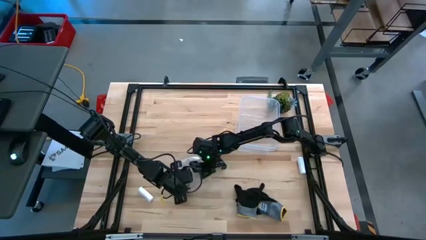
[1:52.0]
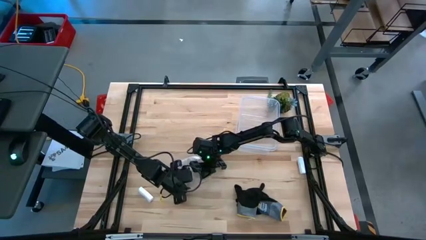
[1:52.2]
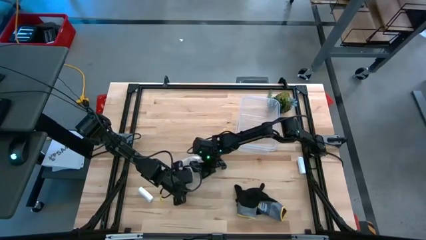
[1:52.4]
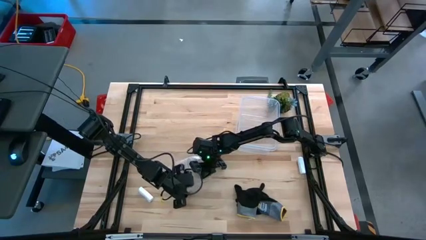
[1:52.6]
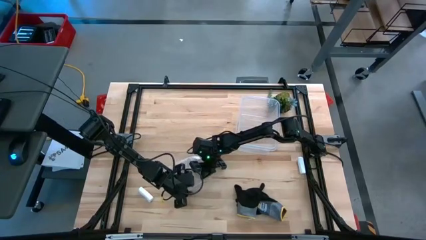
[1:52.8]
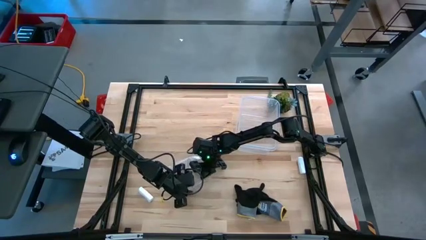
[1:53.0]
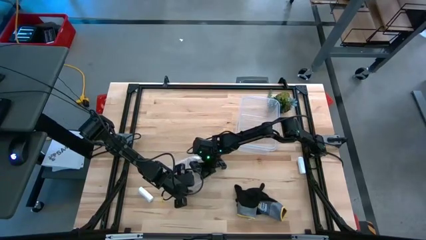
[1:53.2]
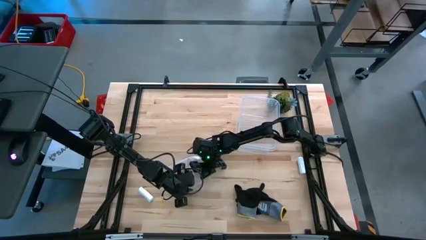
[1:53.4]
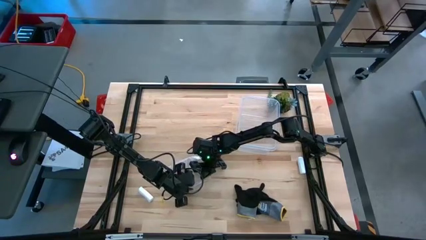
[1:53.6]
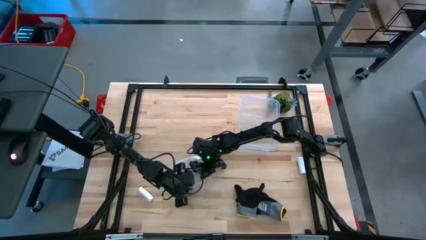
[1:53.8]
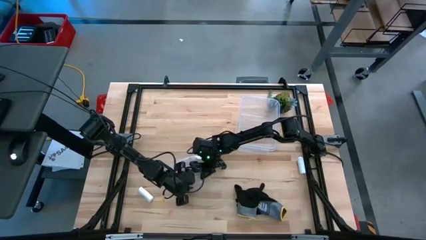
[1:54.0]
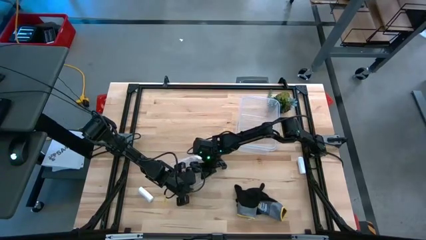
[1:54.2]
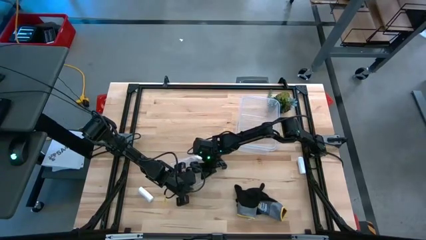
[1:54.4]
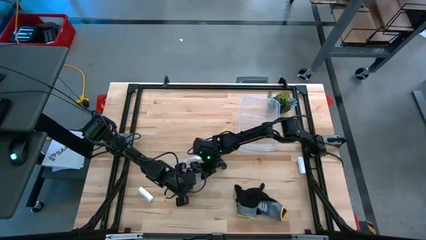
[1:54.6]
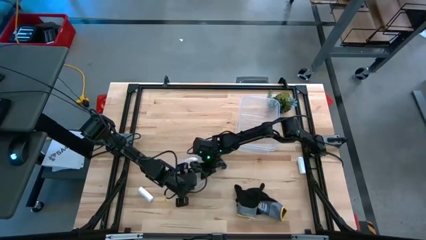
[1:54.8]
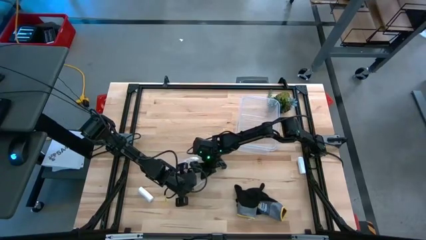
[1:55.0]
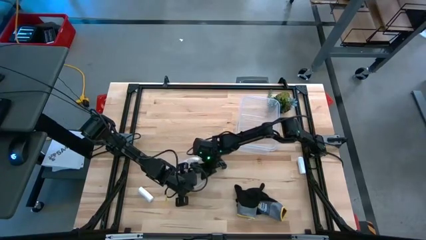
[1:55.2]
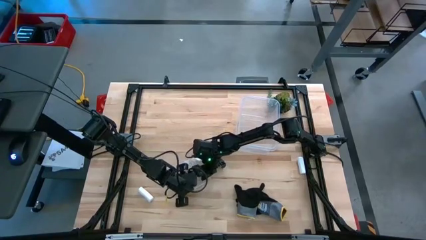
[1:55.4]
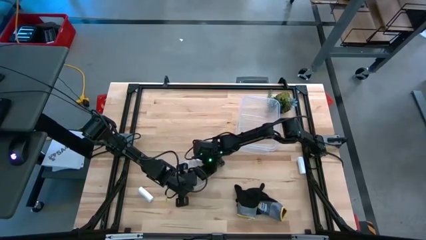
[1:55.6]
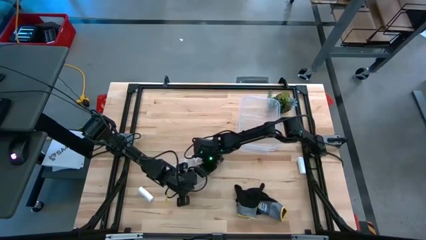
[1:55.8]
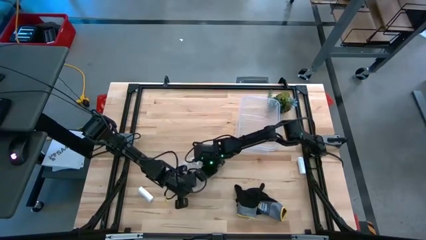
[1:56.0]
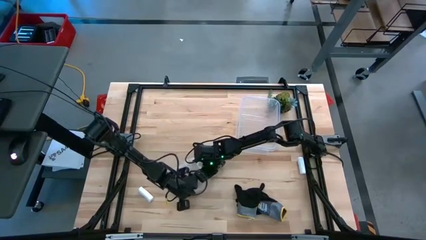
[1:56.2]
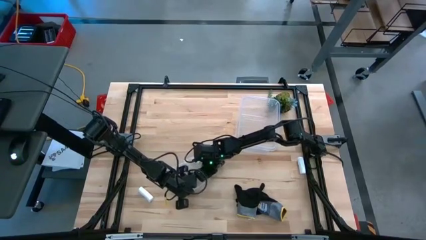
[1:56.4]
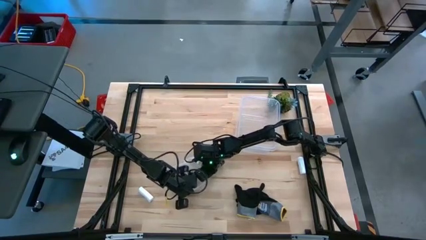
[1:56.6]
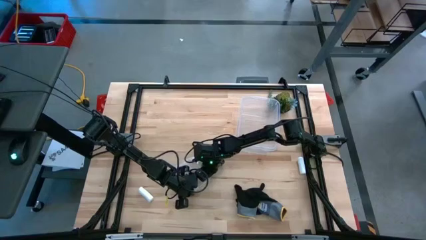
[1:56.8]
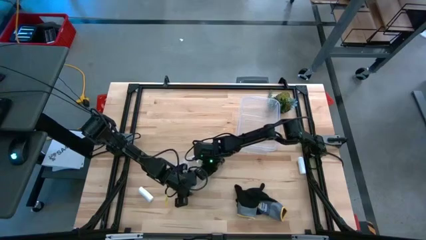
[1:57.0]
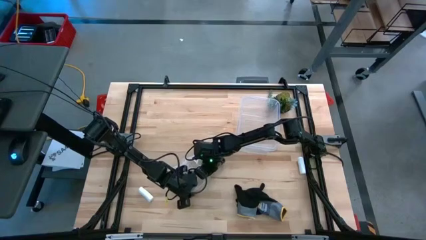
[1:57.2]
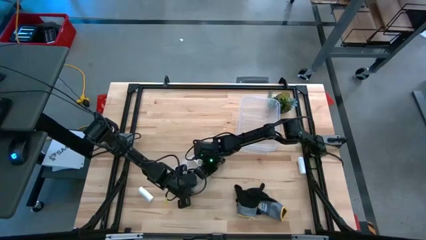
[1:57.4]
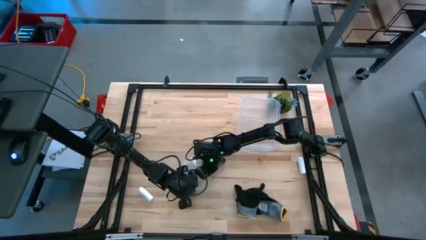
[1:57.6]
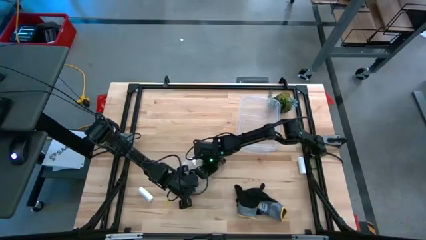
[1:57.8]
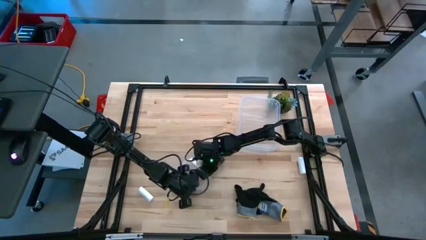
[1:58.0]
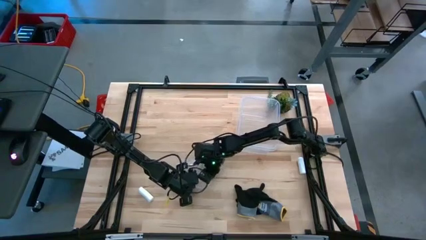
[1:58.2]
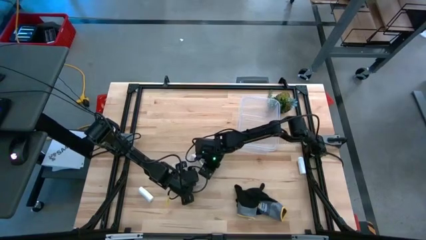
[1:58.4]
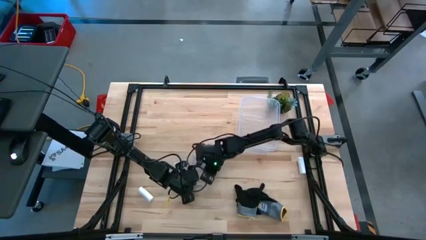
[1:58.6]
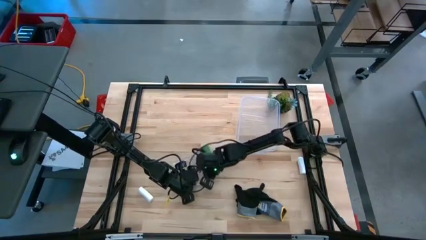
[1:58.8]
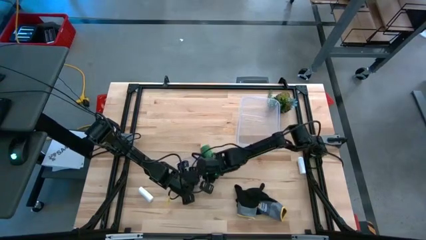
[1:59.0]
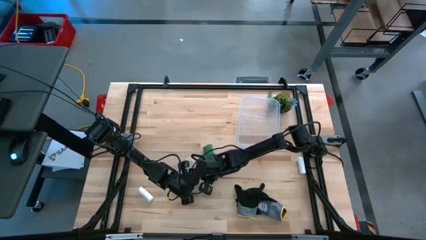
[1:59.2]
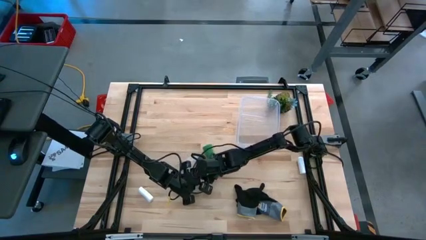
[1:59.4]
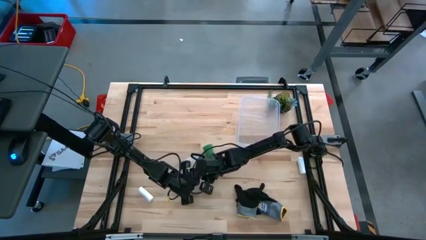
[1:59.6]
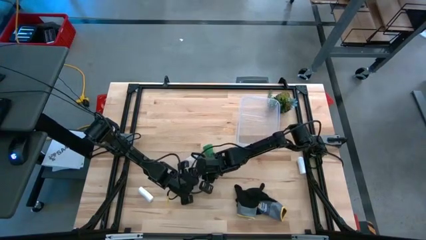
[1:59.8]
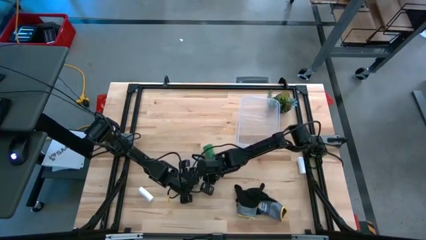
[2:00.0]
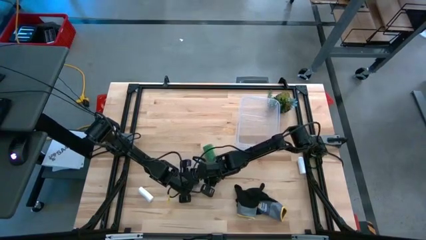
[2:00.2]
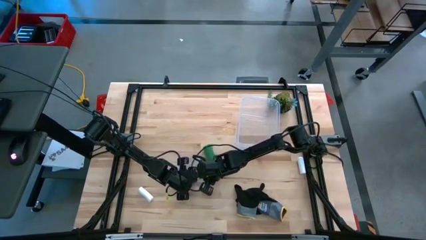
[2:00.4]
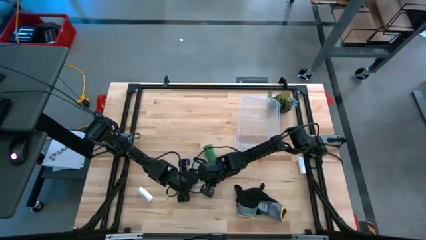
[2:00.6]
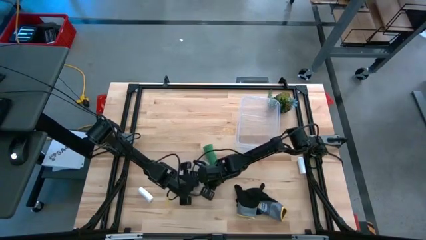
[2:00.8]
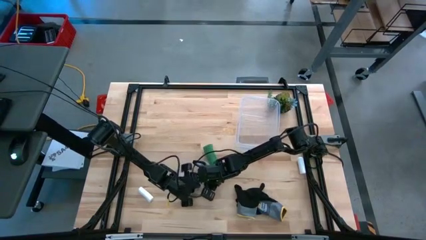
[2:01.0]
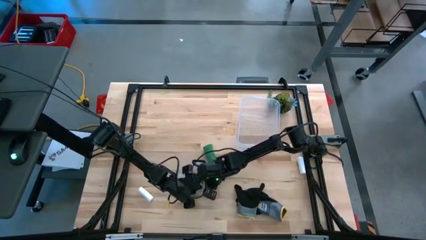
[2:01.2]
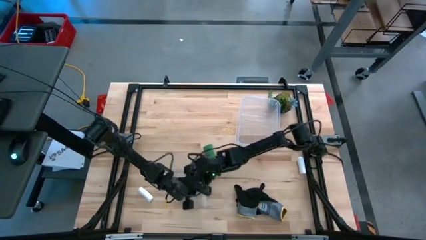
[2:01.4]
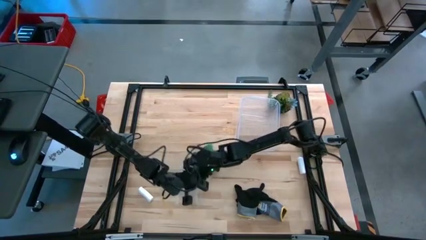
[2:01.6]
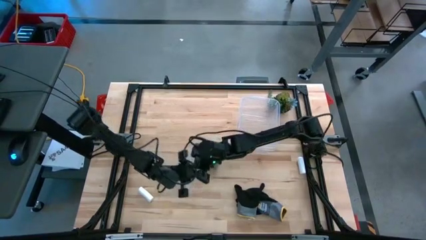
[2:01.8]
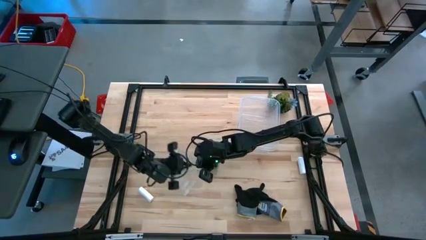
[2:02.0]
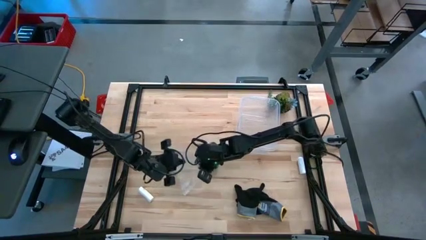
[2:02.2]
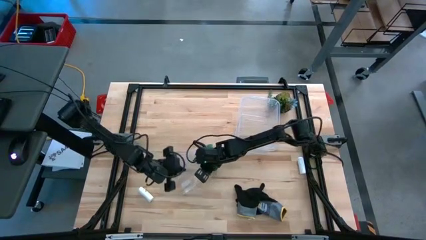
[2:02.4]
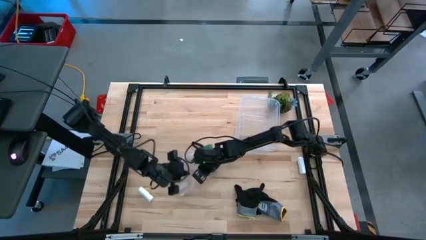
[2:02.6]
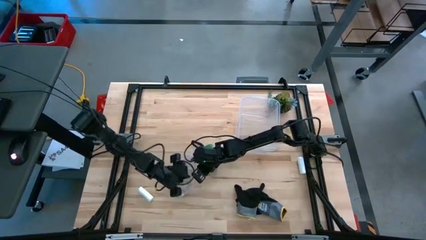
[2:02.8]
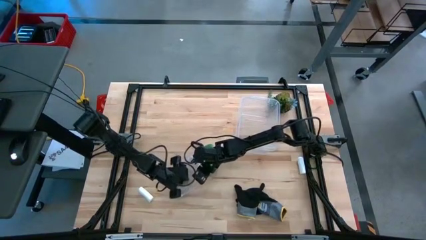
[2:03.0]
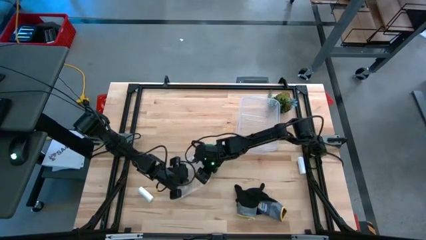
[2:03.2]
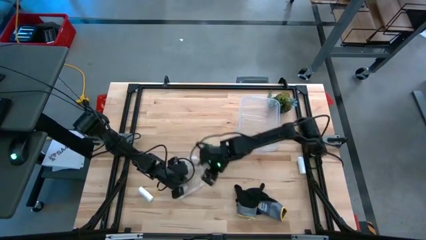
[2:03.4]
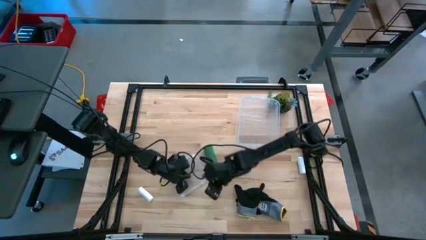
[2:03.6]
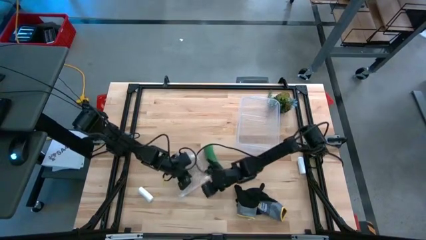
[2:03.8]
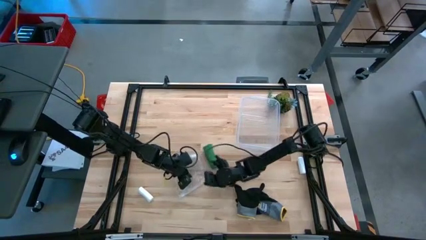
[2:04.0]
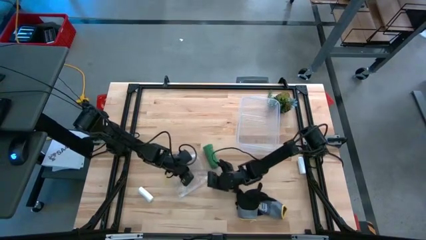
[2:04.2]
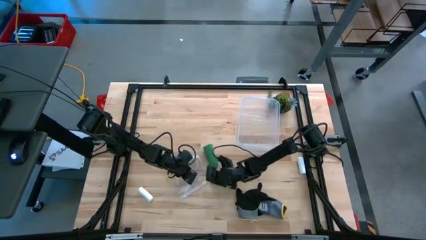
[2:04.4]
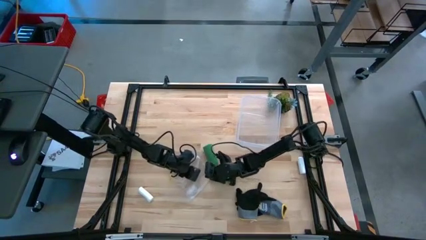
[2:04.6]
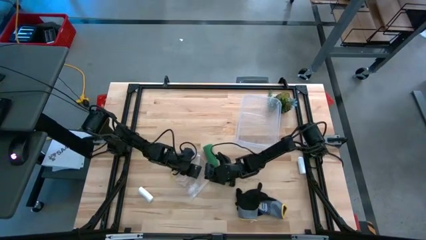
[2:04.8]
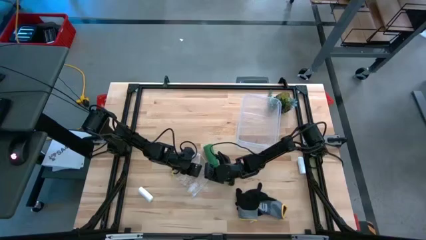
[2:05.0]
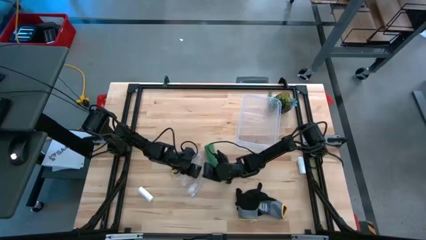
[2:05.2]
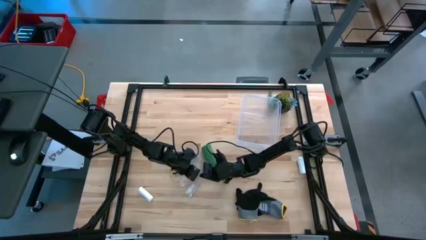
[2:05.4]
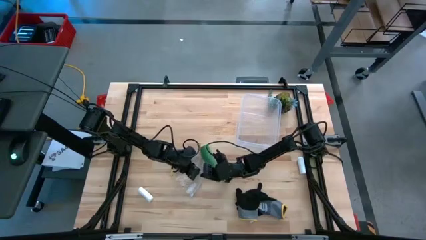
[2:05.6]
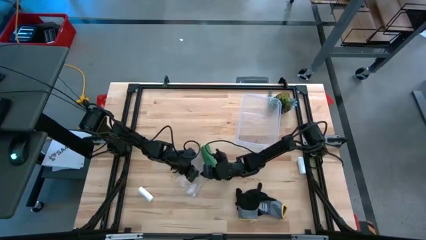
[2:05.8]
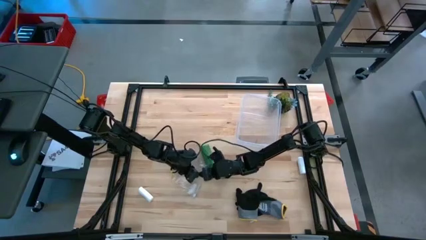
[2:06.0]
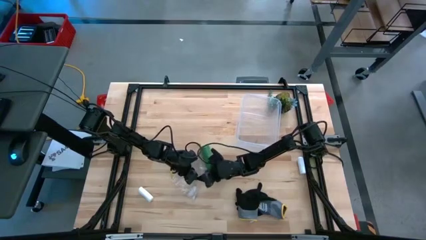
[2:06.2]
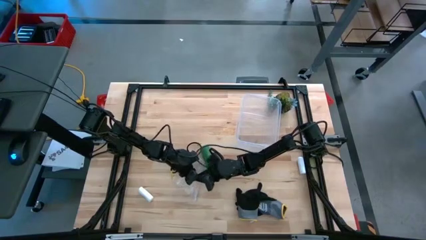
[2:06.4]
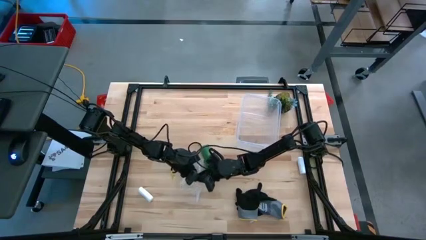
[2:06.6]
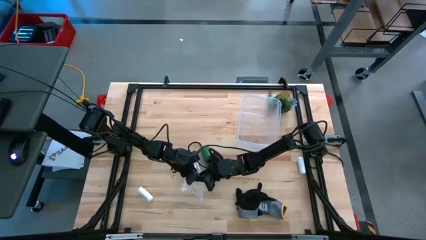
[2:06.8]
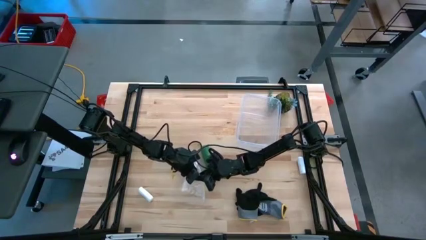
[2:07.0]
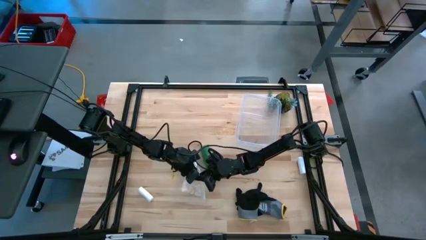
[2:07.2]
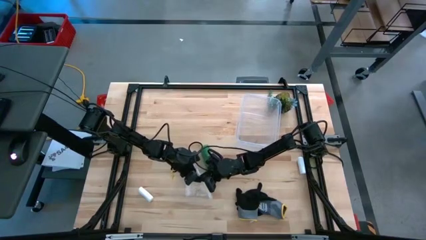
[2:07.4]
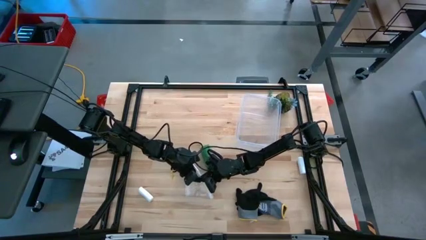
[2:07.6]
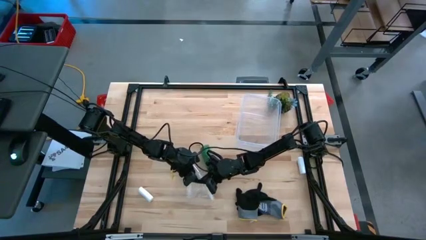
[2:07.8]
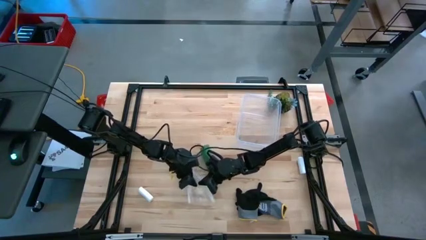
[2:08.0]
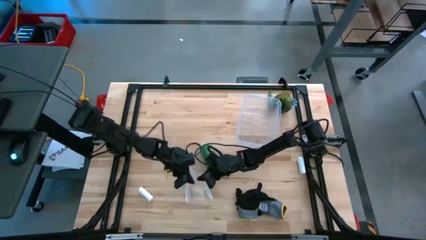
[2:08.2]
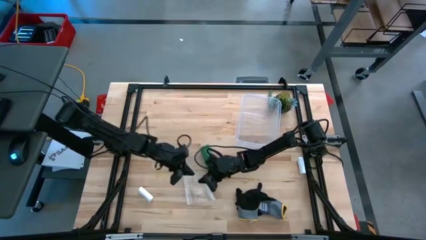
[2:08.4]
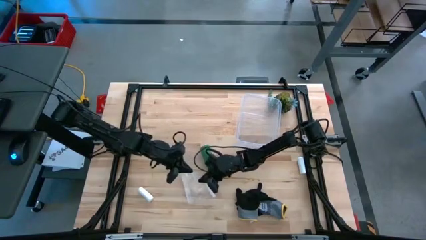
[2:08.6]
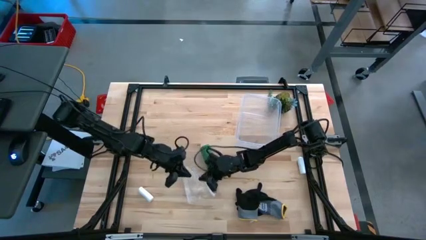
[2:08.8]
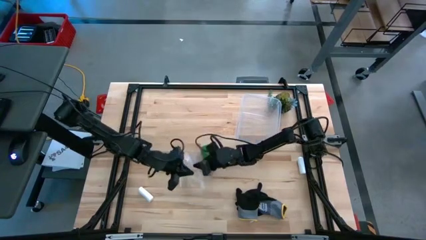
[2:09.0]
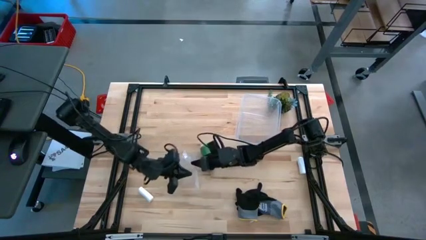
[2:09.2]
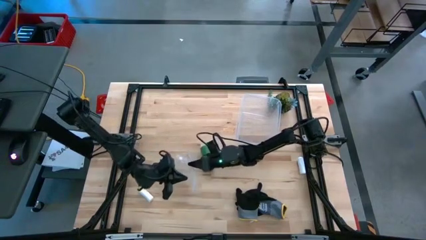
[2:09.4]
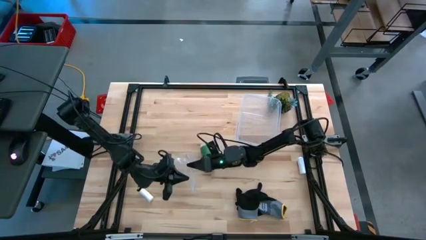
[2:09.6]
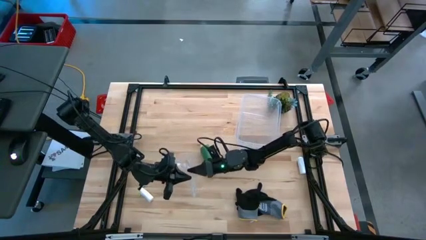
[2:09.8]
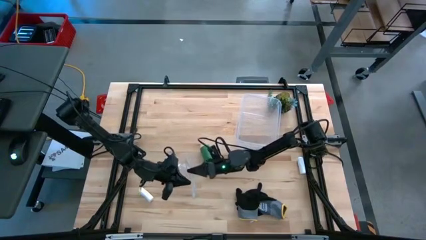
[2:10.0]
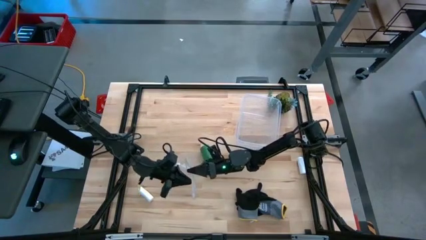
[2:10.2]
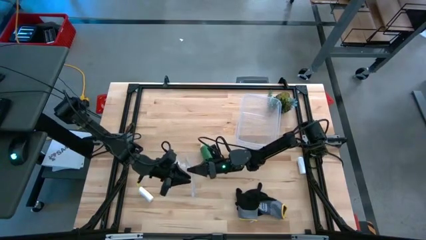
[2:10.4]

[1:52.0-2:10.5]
Task: Roll bandage
Open the transparent zip bag
